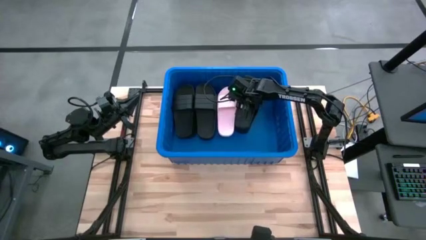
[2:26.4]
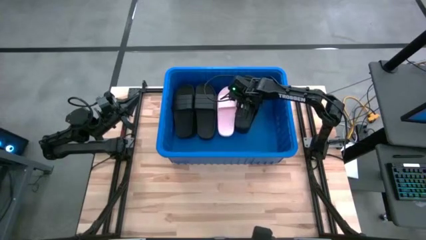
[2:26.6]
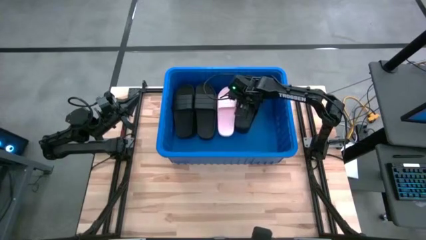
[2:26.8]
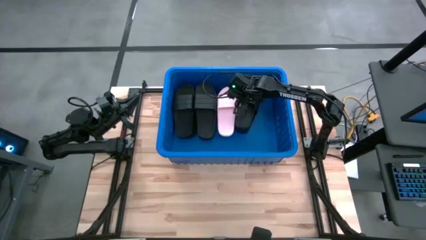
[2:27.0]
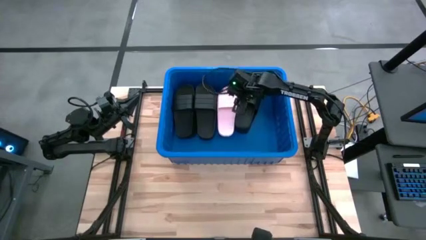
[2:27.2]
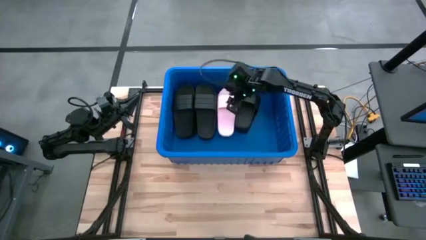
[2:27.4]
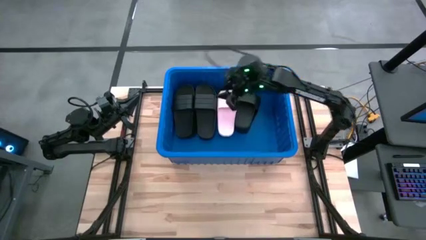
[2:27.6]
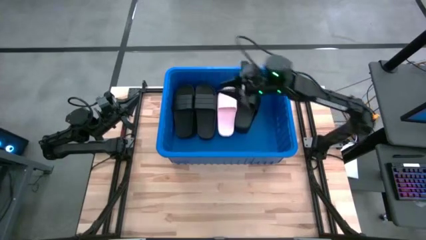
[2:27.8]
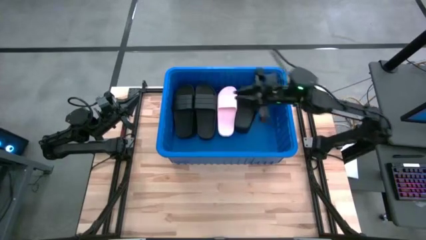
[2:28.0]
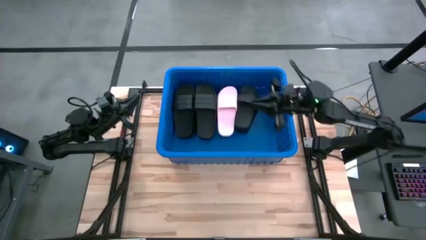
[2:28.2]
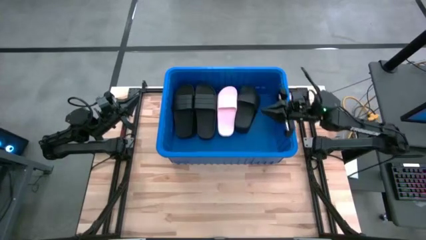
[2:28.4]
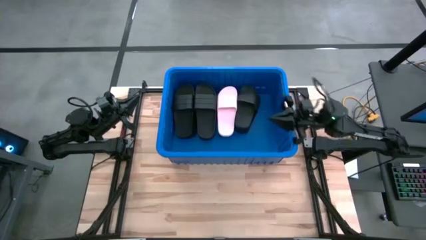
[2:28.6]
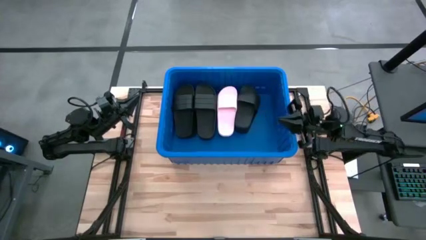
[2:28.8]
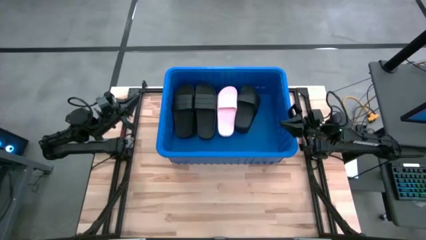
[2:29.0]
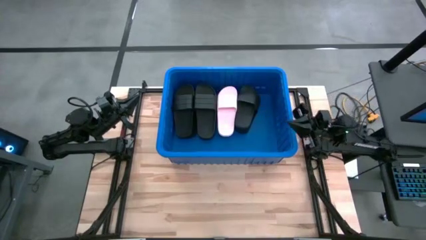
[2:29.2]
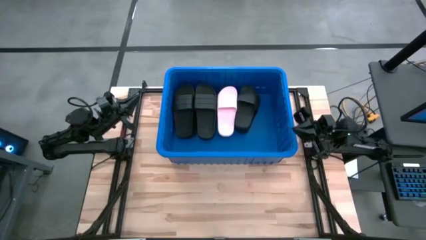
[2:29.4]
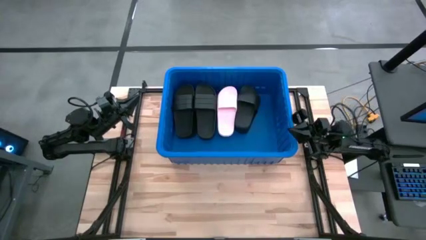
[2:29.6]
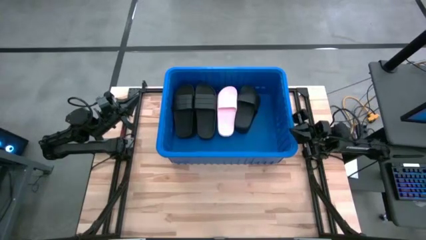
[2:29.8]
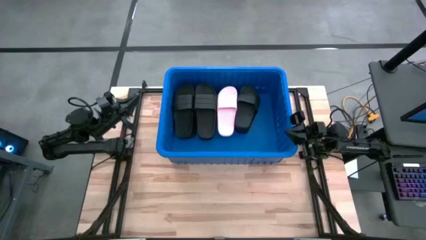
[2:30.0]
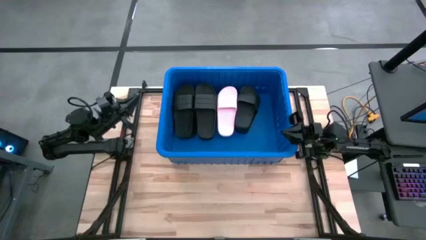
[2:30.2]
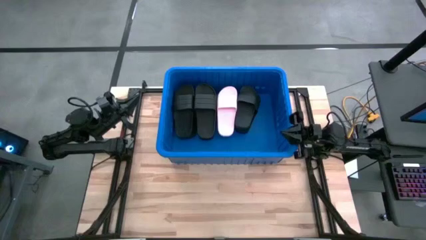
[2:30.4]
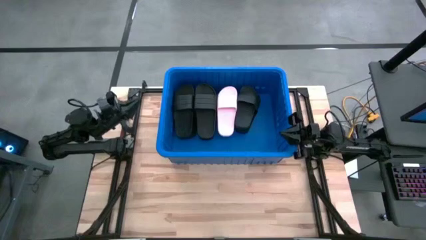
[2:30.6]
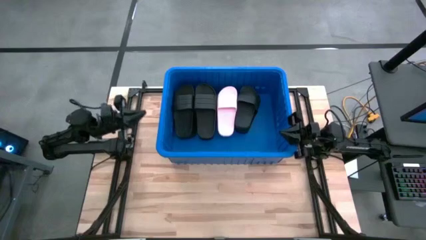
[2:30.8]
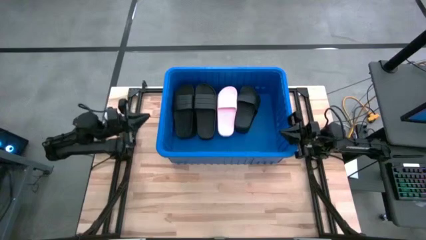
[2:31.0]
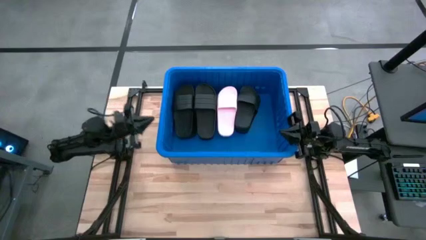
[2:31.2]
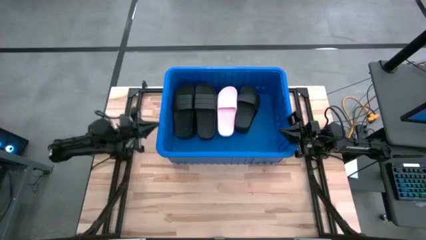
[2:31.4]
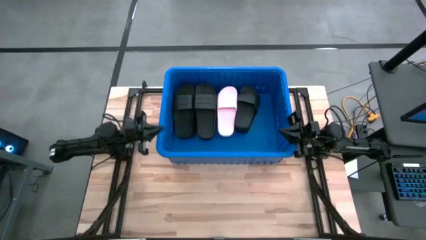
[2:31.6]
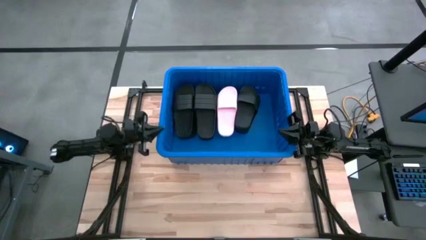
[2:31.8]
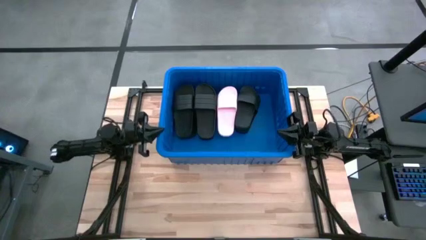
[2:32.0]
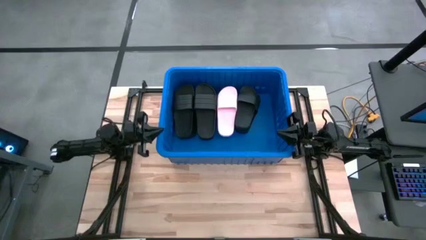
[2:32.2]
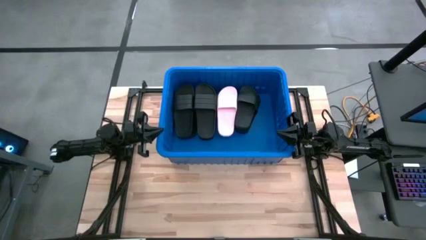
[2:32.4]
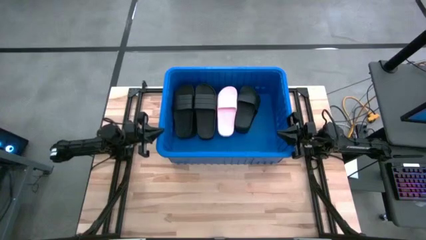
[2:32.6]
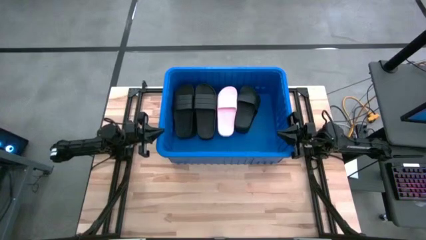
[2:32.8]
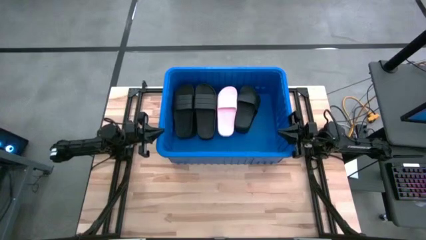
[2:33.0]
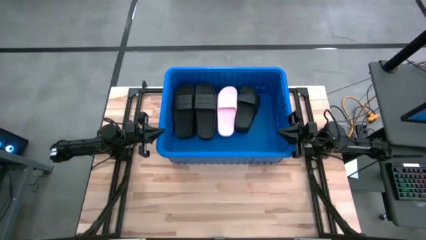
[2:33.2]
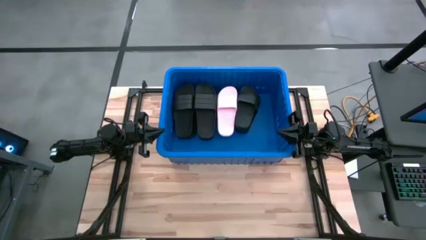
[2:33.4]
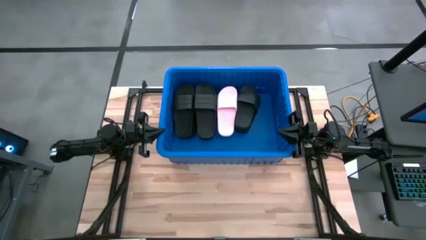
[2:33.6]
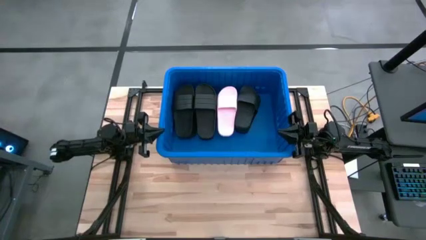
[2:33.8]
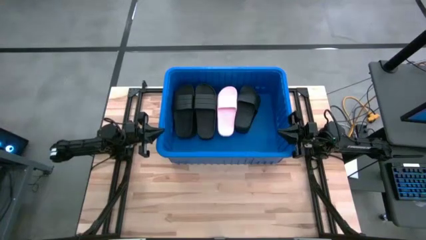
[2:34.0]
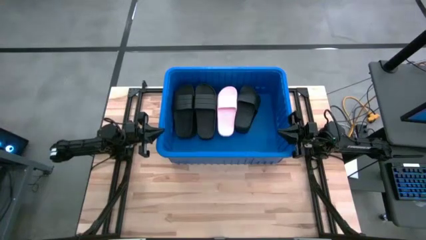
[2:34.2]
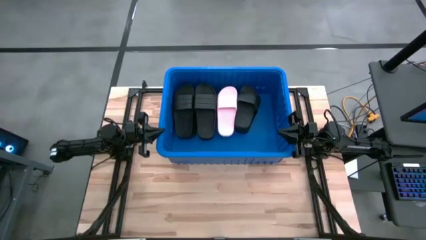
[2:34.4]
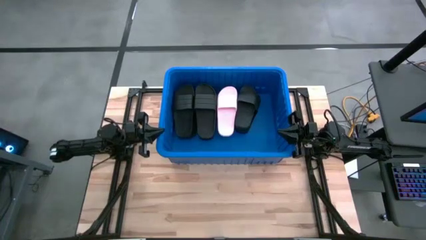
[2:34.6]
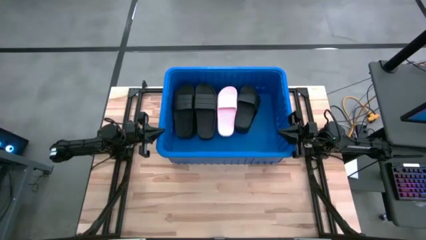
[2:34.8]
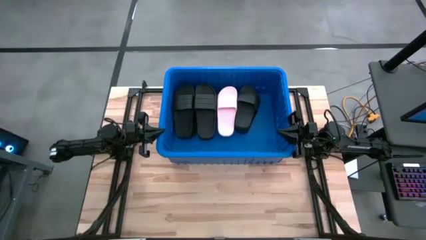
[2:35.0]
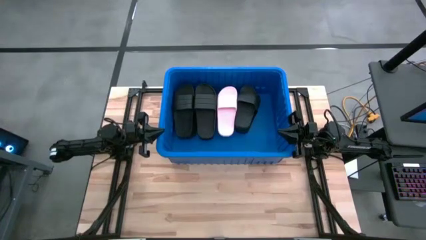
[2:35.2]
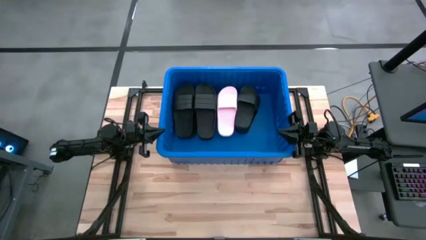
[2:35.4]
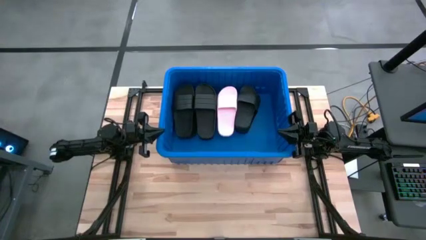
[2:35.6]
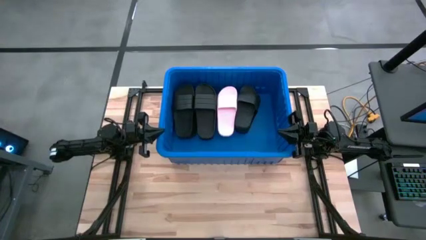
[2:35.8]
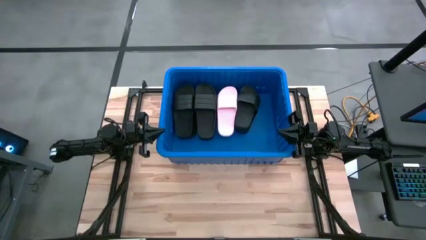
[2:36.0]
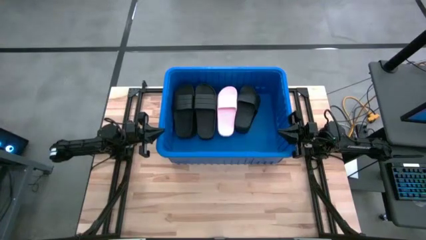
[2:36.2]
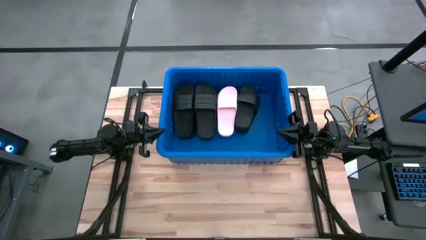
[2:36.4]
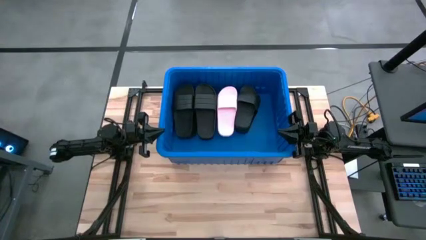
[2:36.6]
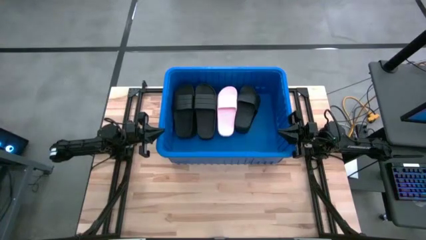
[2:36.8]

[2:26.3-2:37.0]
Task: Pick and place slides into bin
Return to Home Position
